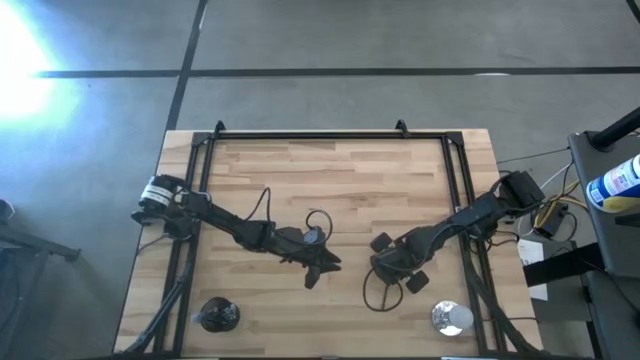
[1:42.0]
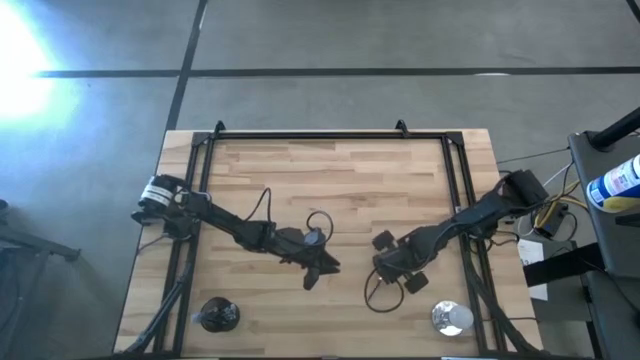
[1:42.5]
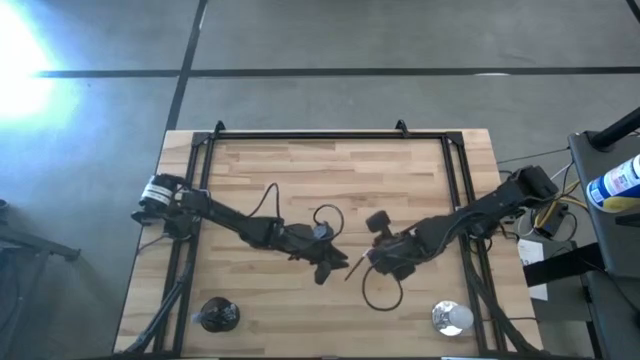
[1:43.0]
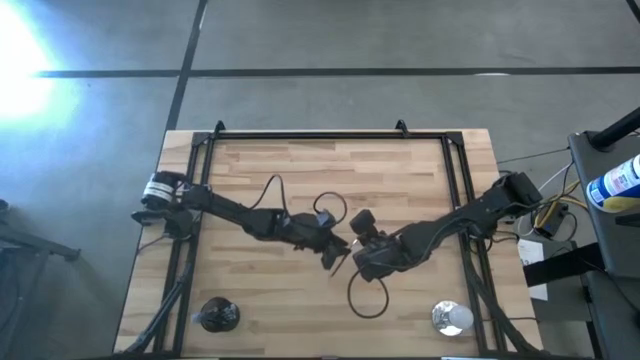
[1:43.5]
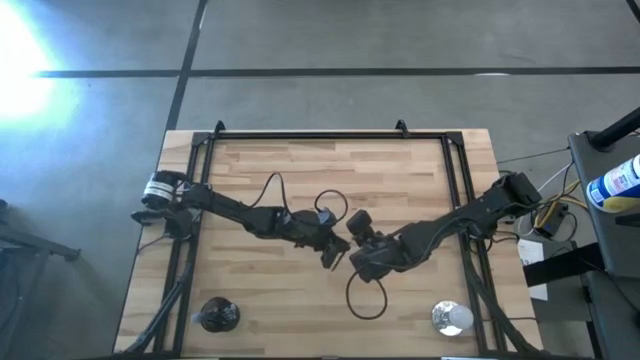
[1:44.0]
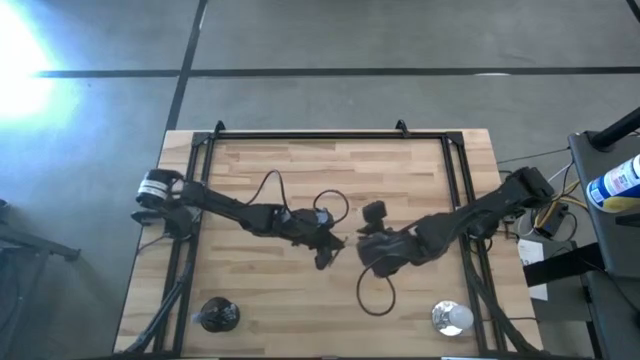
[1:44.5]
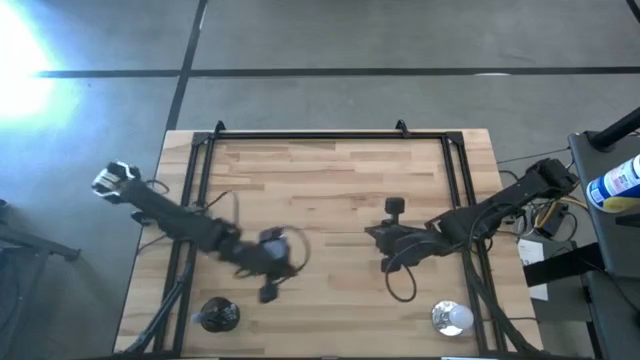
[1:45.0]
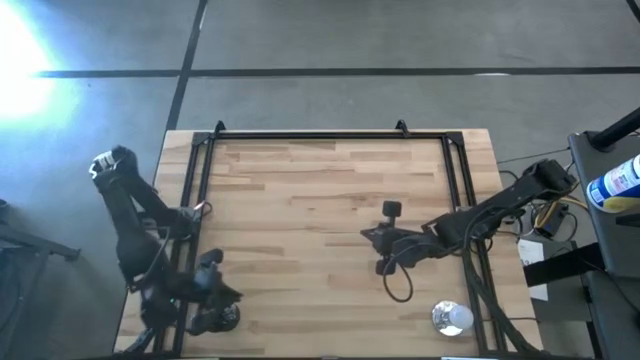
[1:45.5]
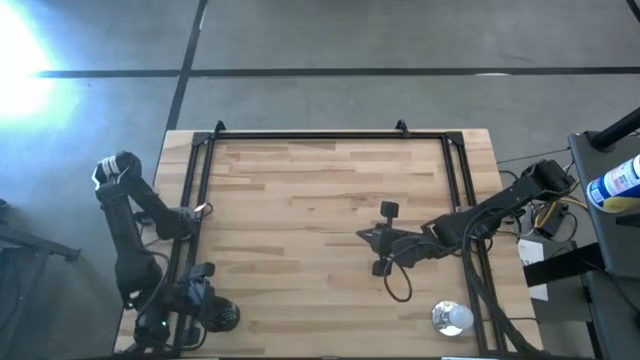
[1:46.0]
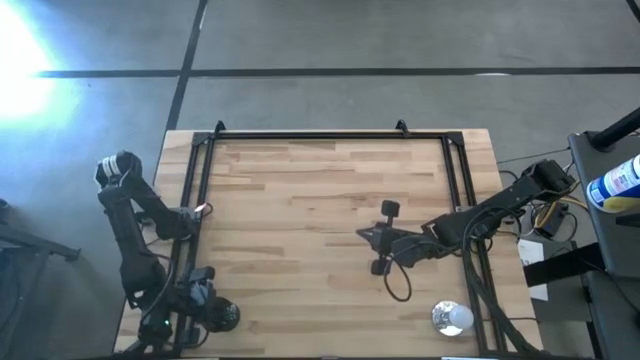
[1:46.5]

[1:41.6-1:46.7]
Task: Pick & Place Makeup Brushes
Put the black eyeshadow brush into the makeup holder

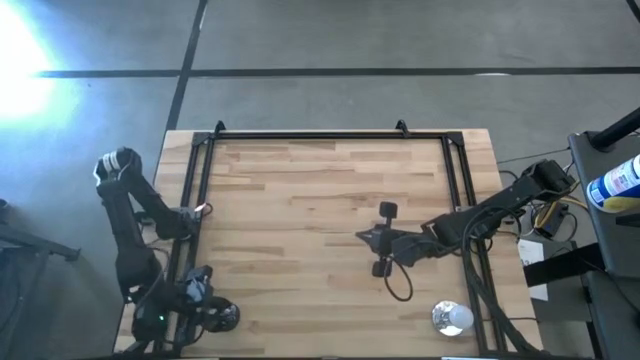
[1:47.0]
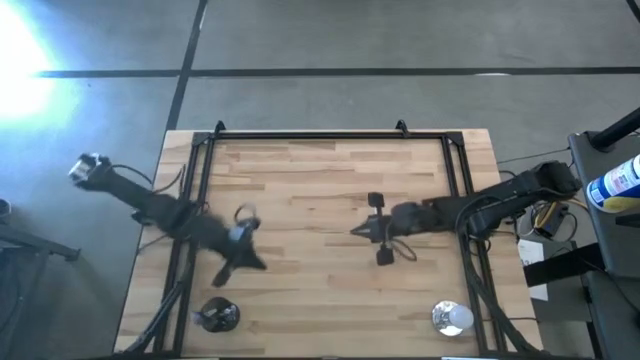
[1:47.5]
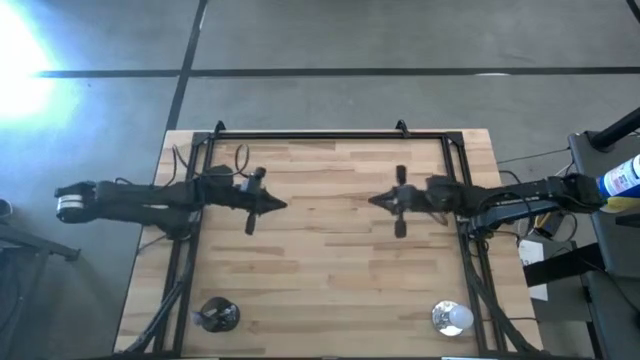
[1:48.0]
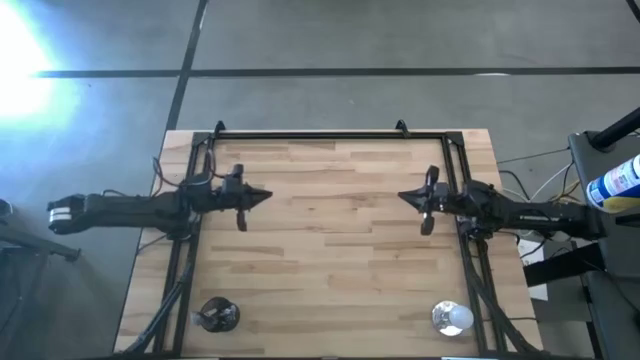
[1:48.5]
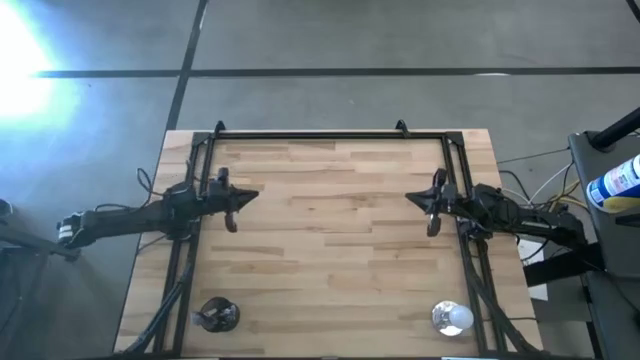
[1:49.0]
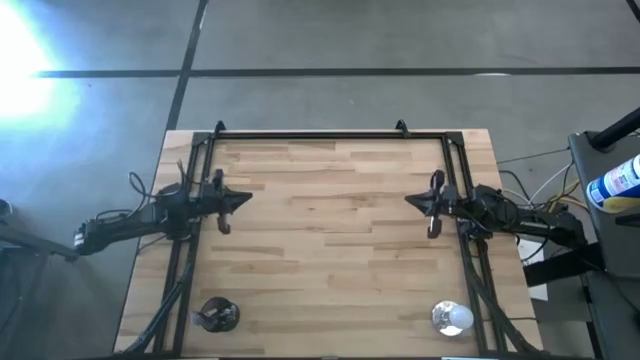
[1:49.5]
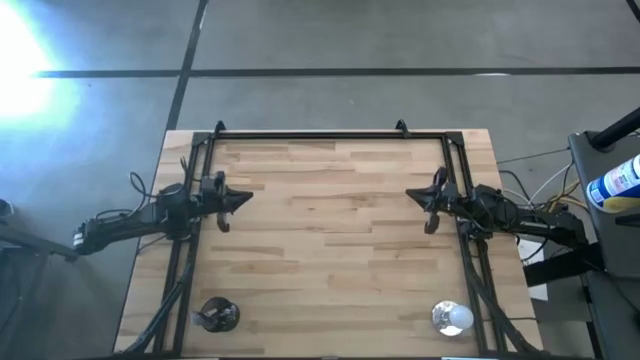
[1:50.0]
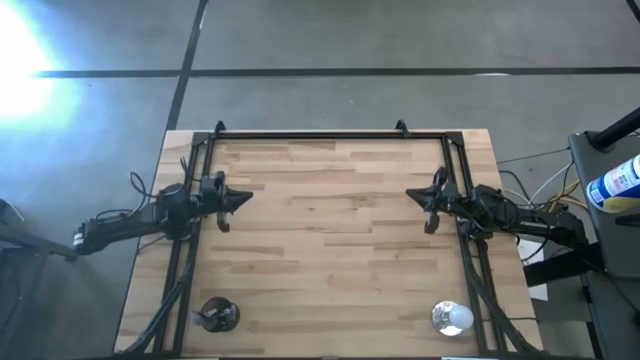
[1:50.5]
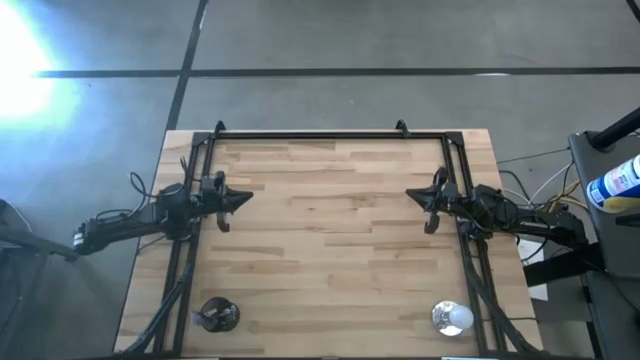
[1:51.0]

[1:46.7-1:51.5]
Return to Home Position

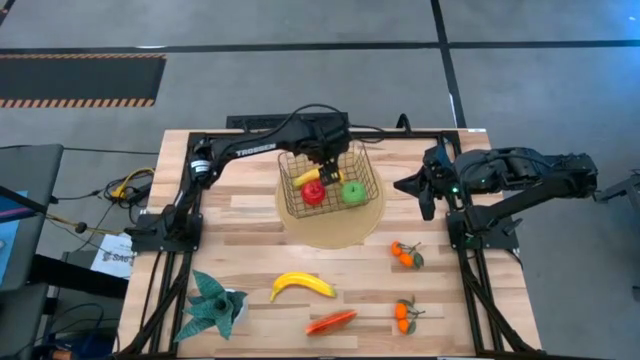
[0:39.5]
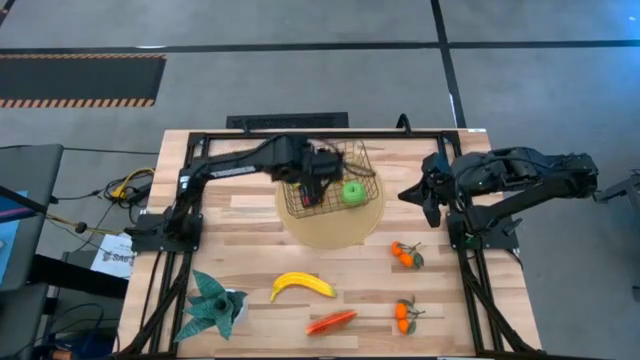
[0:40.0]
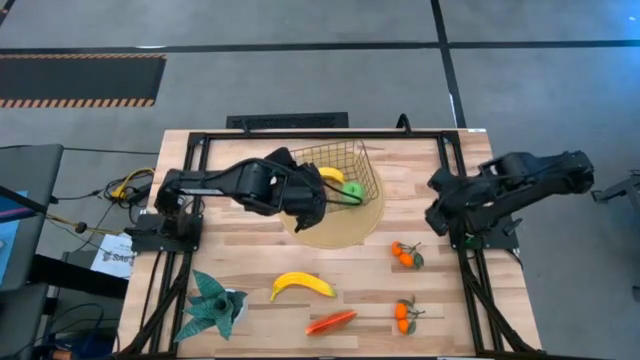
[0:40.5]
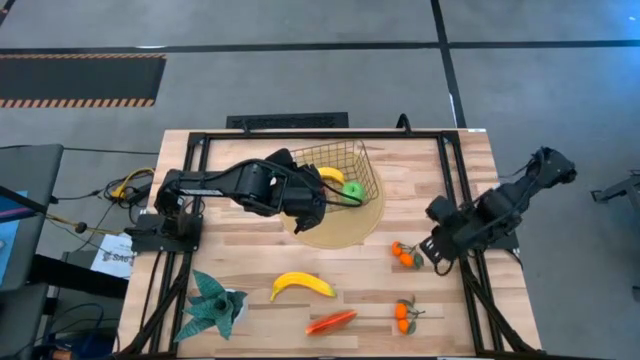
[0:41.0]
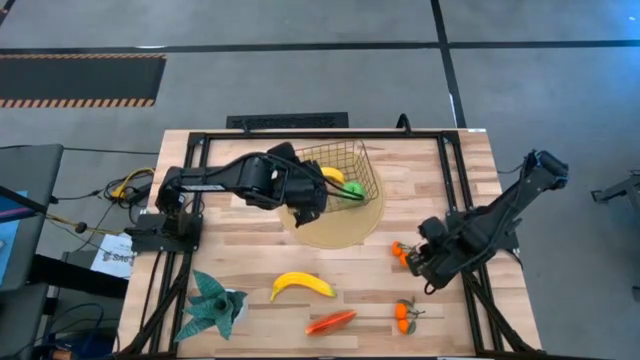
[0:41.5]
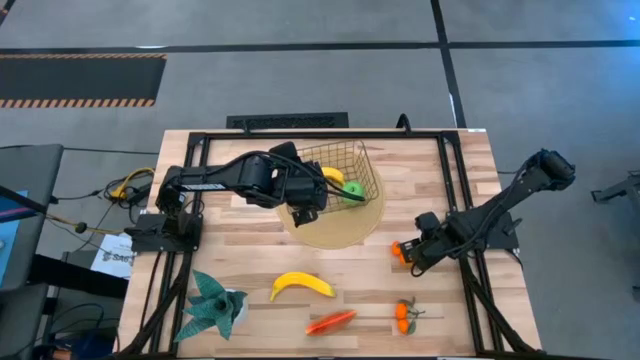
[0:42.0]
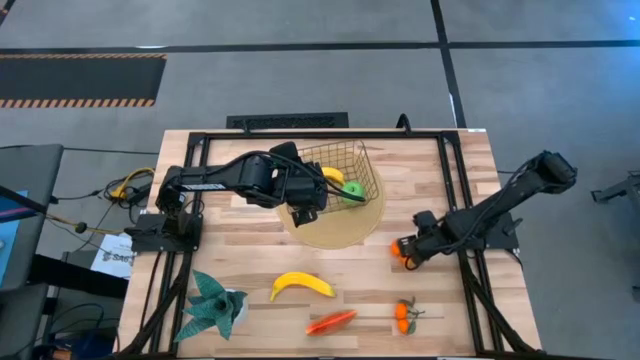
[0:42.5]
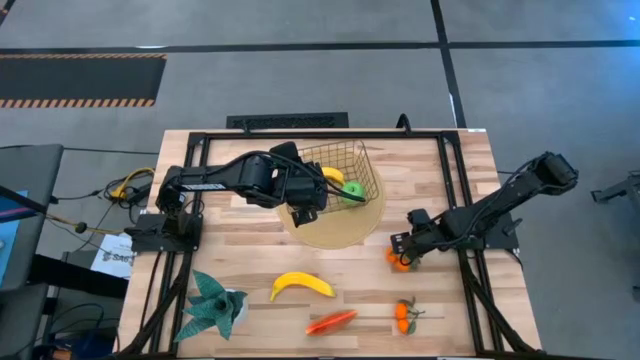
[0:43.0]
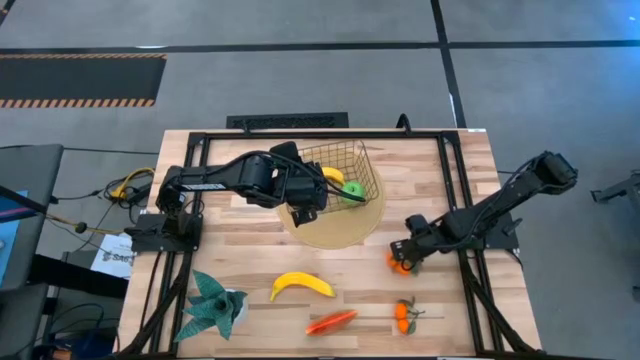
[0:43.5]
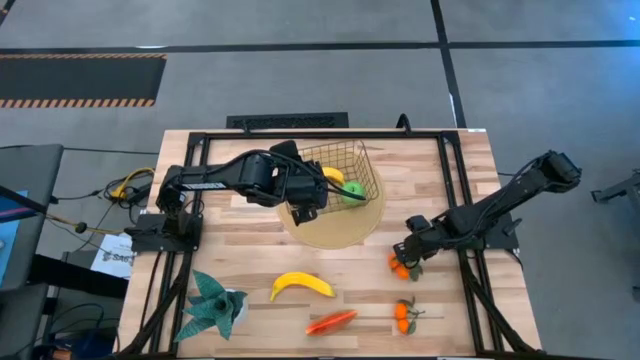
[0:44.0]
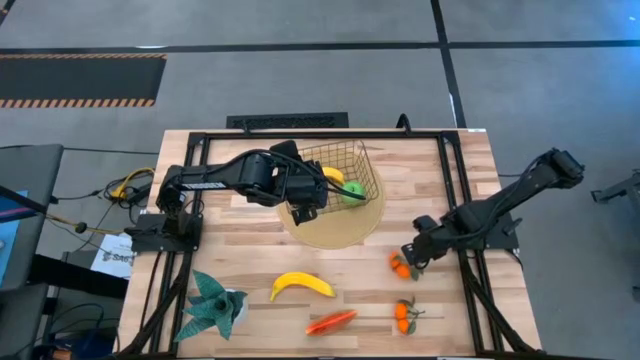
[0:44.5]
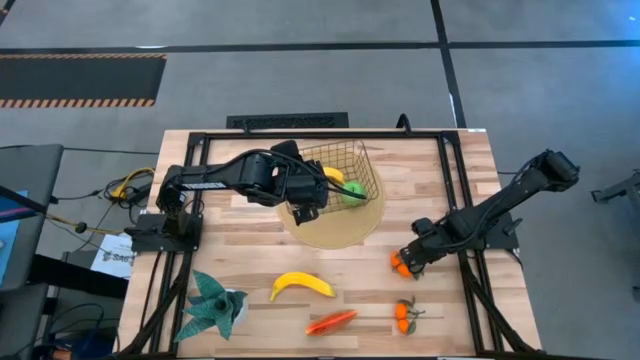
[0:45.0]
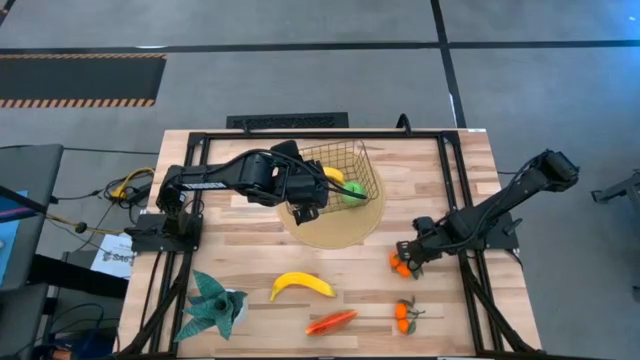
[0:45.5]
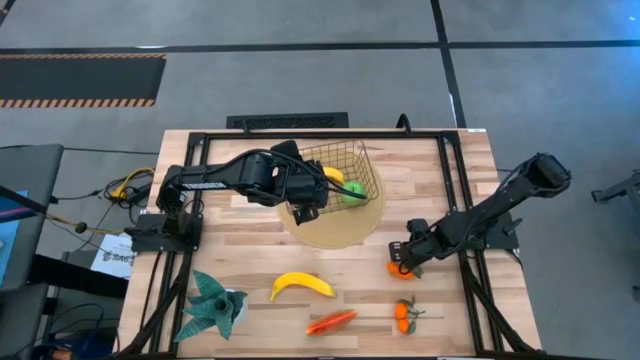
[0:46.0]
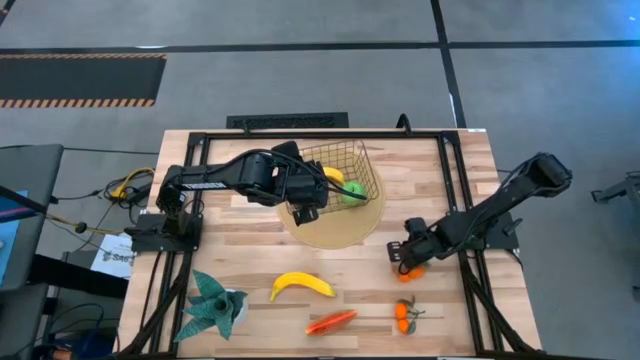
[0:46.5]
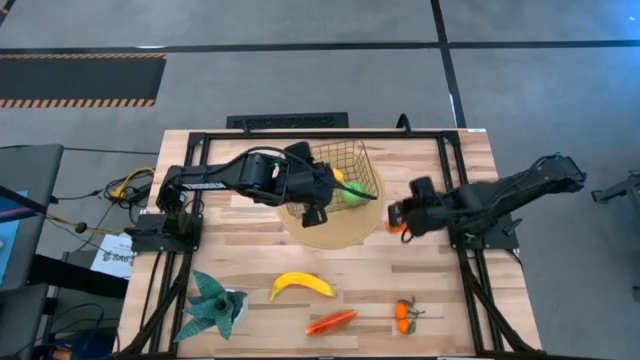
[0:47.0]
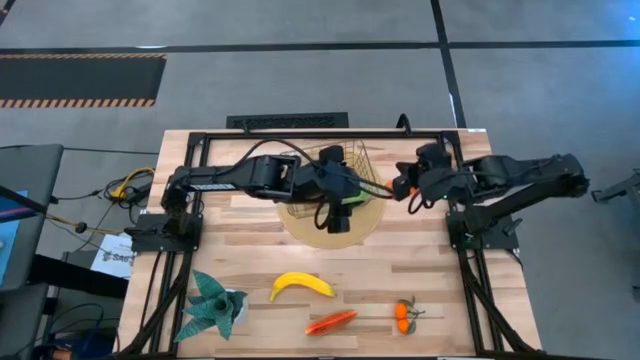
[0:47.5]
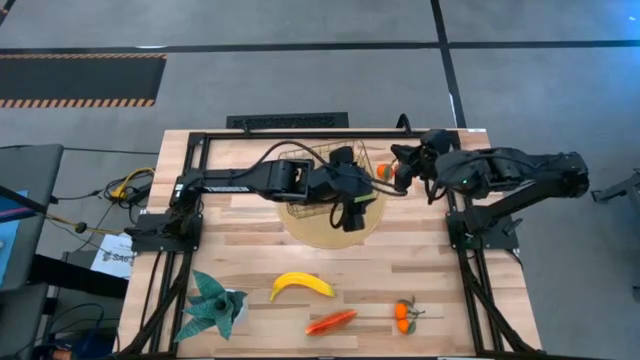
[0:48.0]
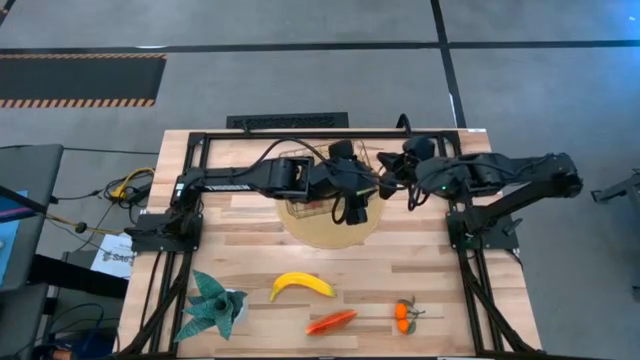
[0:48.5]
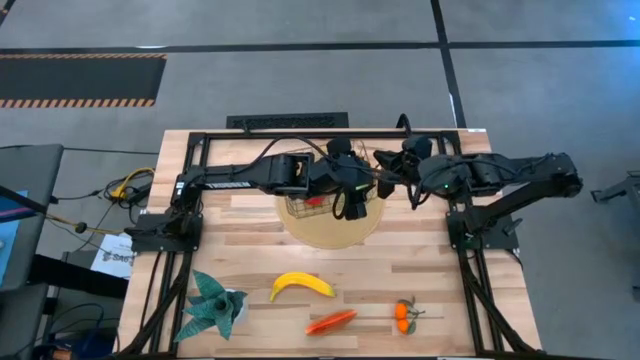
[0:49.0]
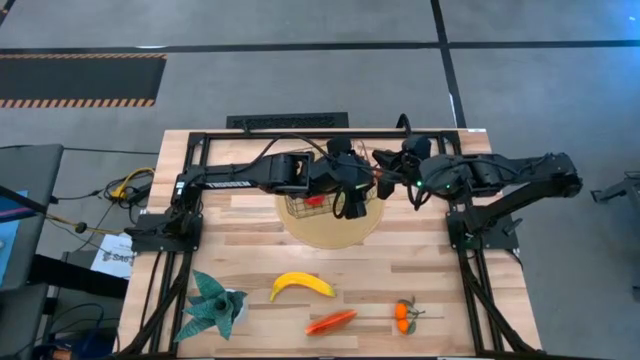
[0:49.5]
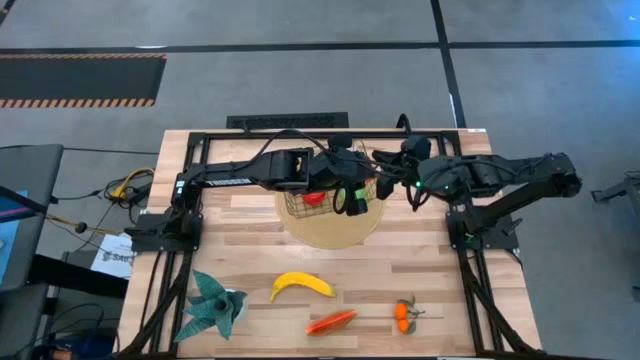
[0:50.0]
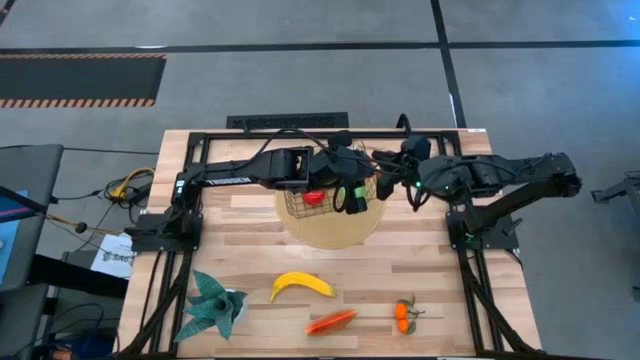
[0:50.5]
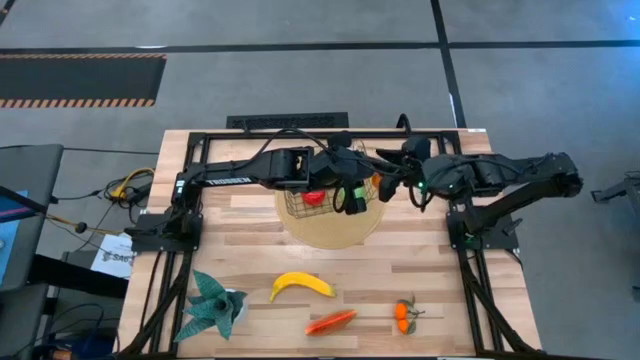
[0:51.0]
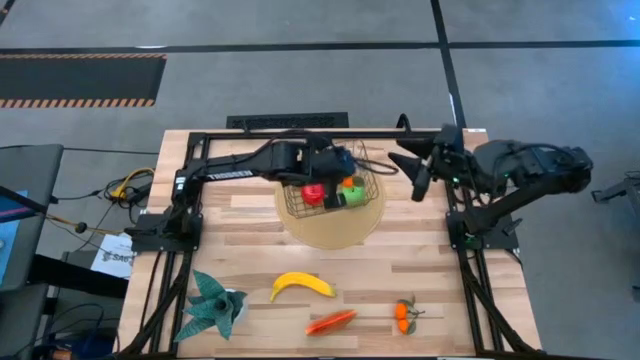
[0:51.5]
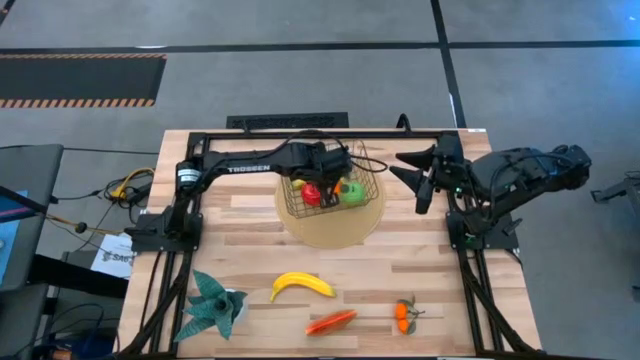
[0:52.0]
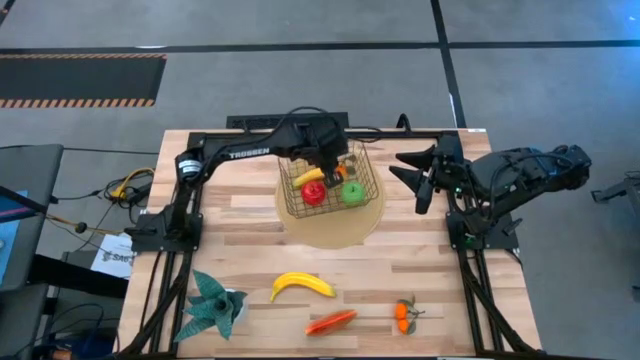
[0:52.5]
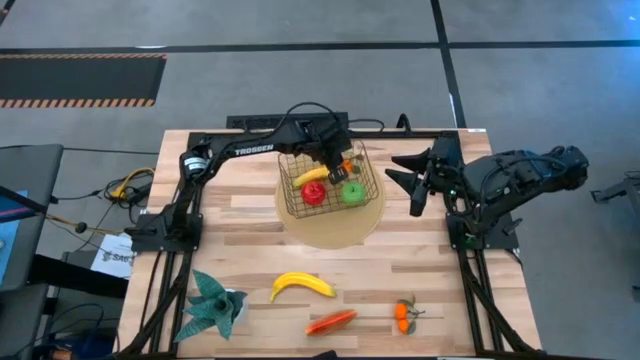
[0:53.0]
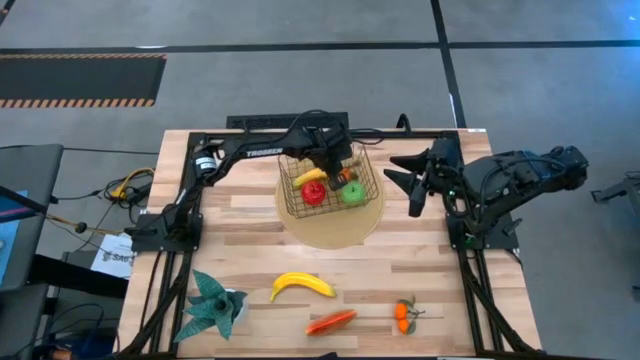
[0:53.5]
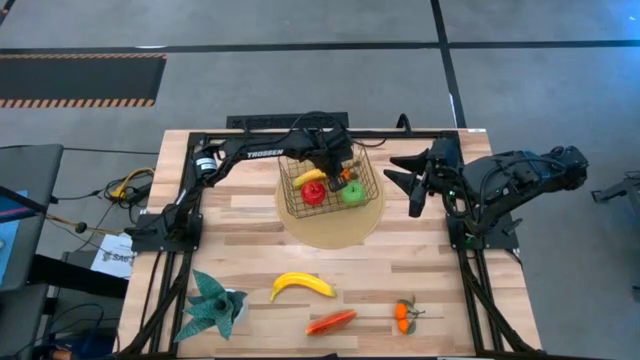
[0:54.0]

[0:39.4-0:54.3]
Task: Build produce basket
Put the oranges into the basket
